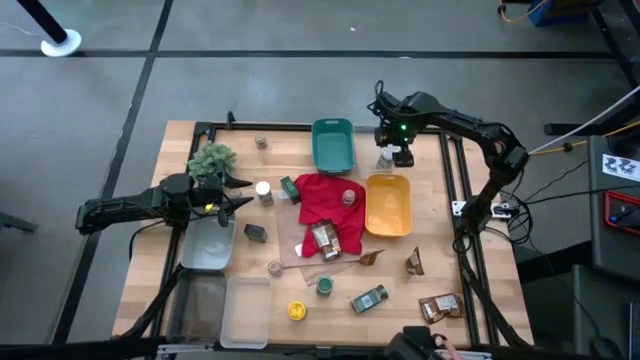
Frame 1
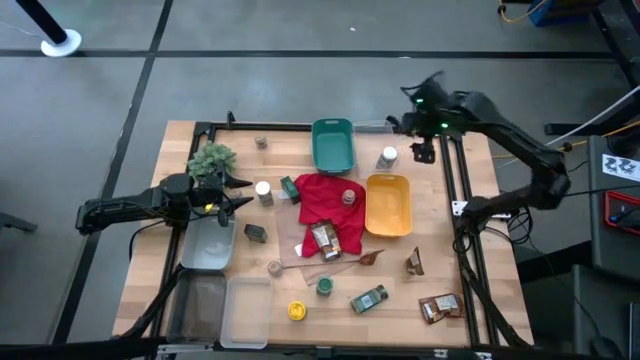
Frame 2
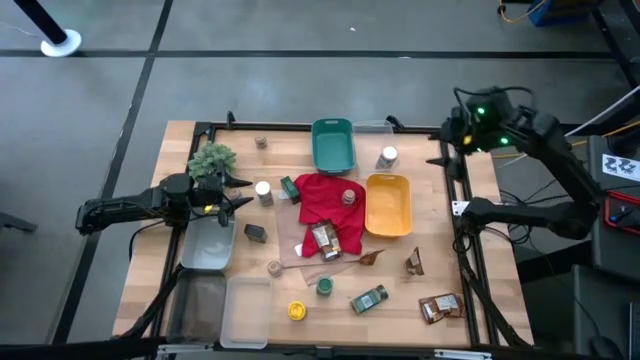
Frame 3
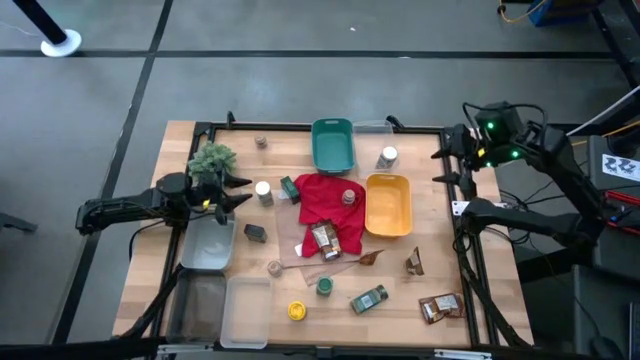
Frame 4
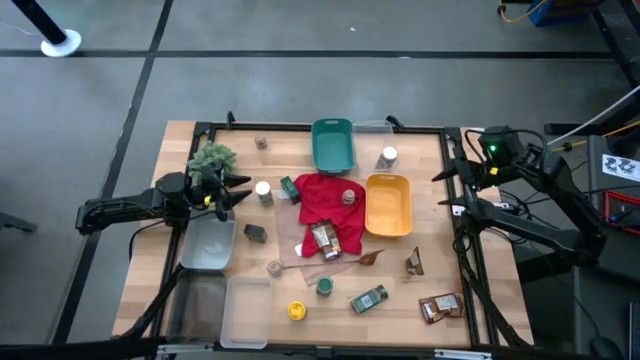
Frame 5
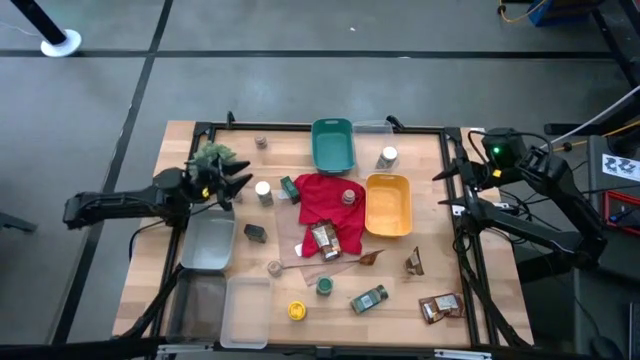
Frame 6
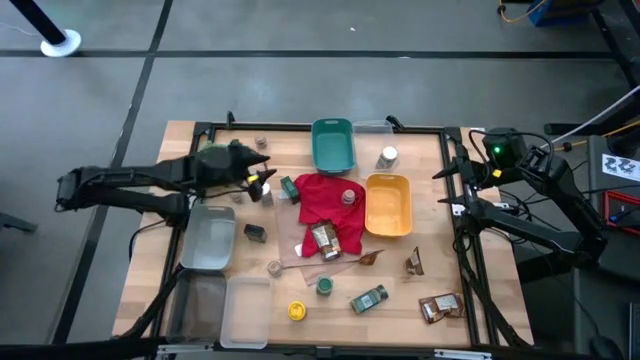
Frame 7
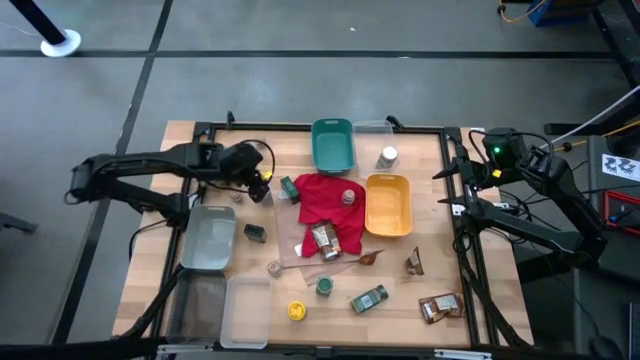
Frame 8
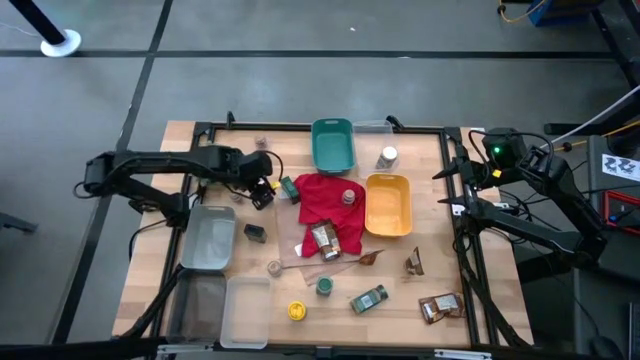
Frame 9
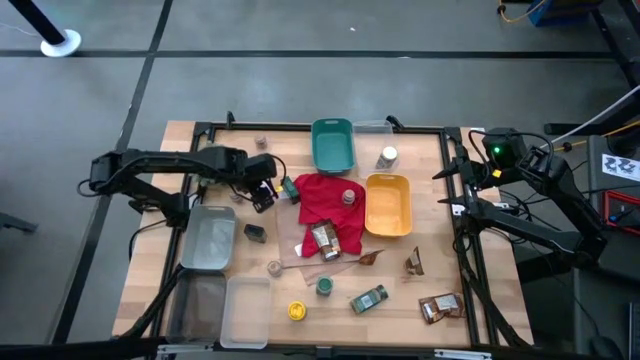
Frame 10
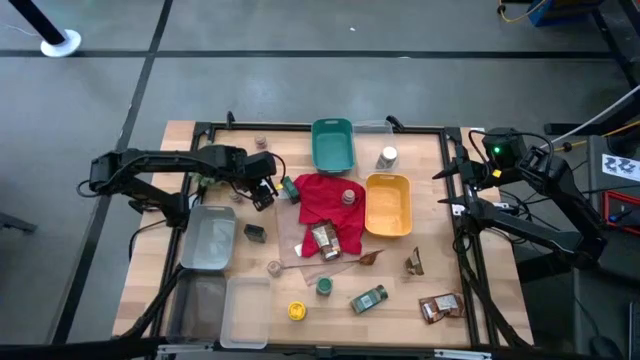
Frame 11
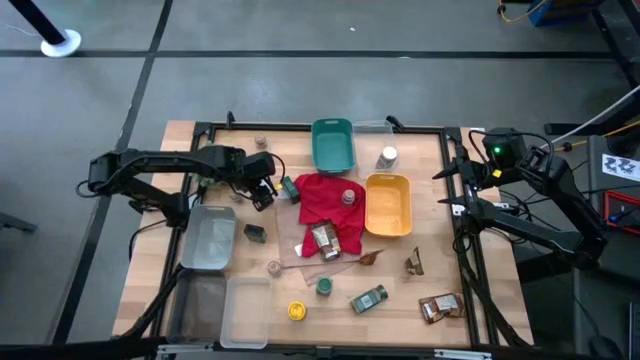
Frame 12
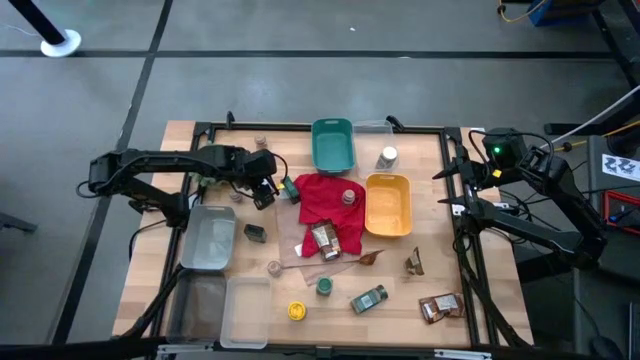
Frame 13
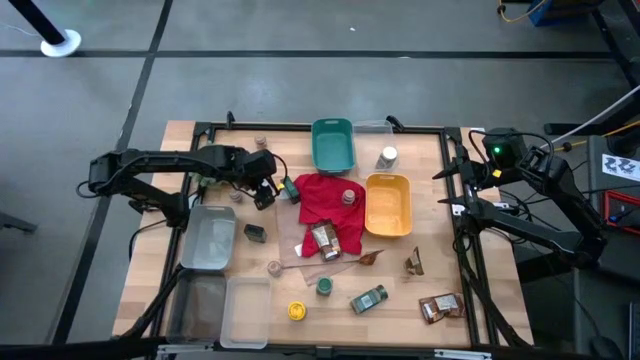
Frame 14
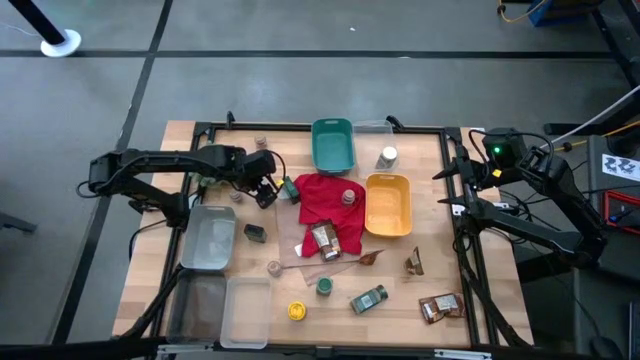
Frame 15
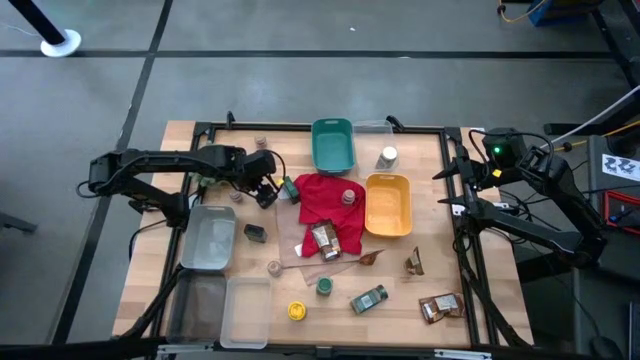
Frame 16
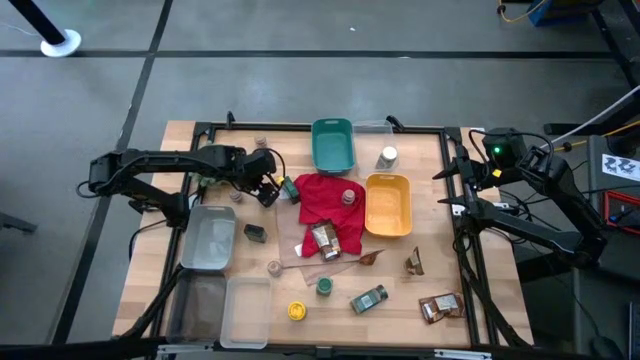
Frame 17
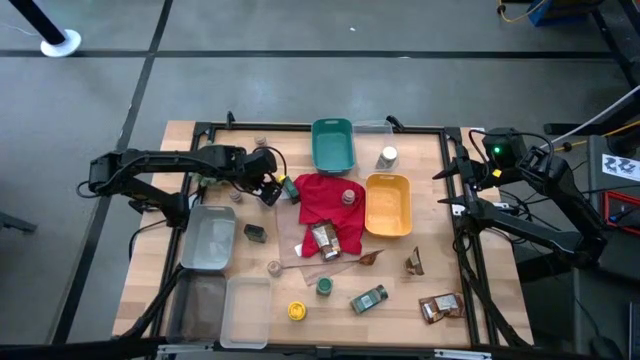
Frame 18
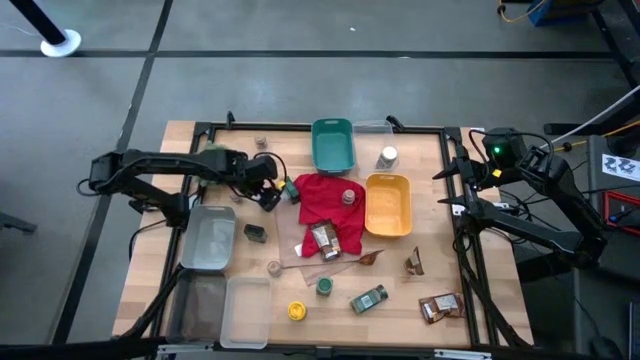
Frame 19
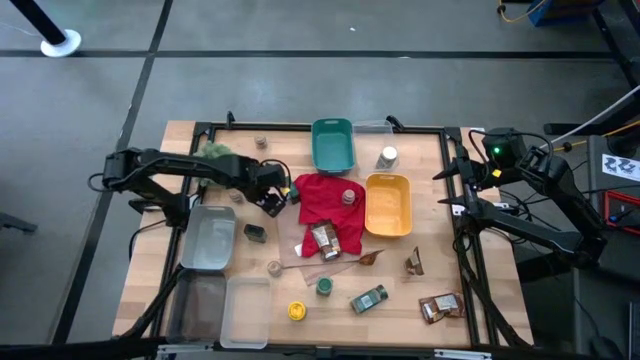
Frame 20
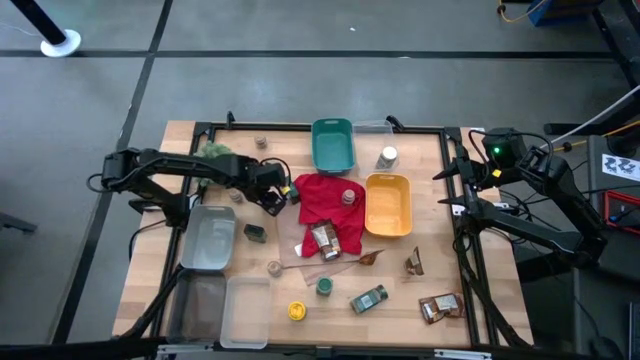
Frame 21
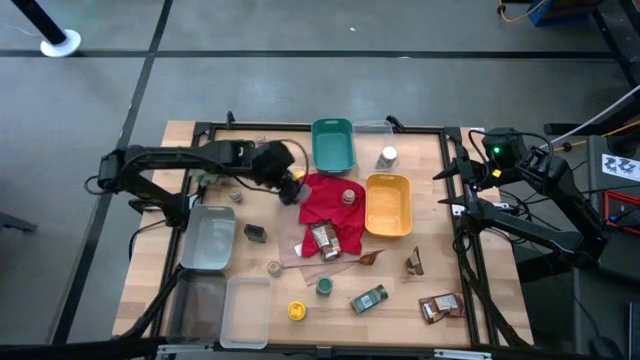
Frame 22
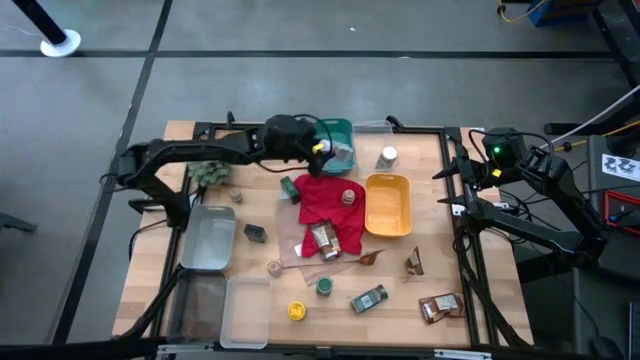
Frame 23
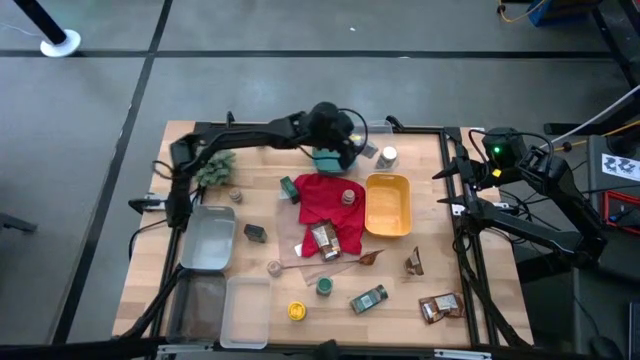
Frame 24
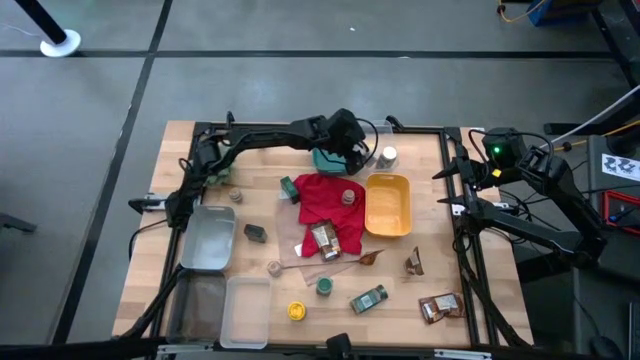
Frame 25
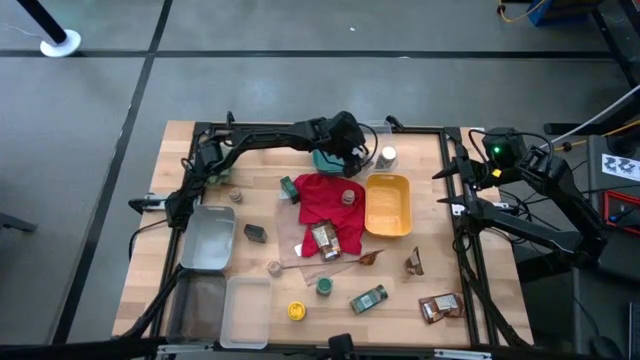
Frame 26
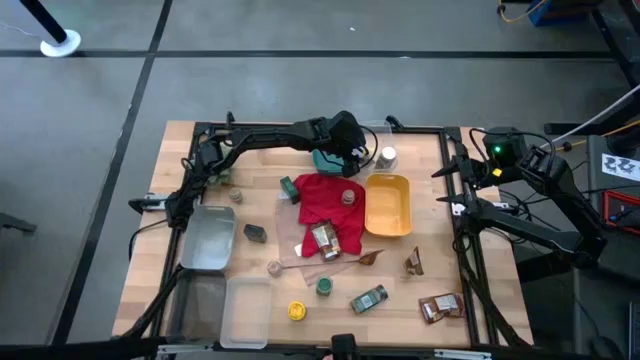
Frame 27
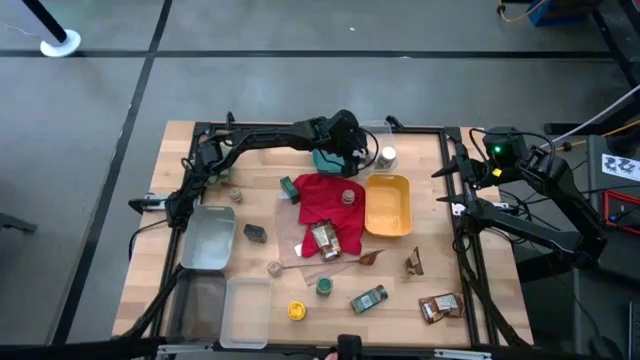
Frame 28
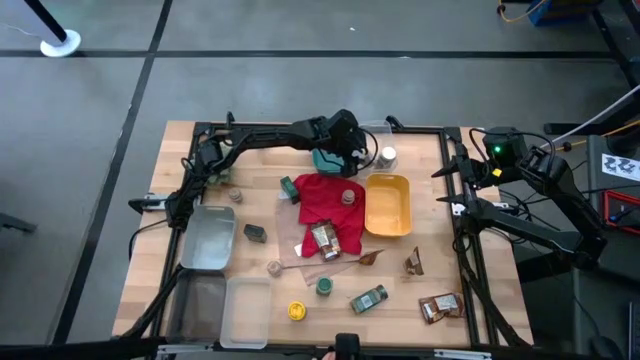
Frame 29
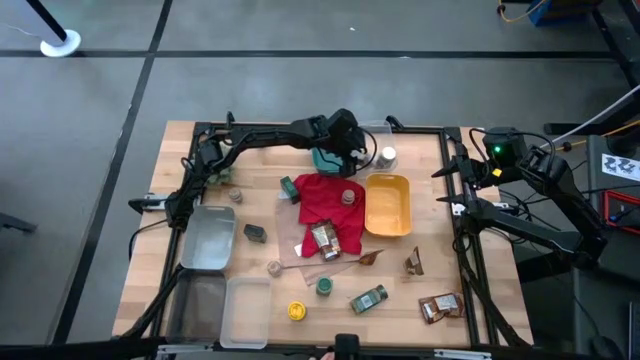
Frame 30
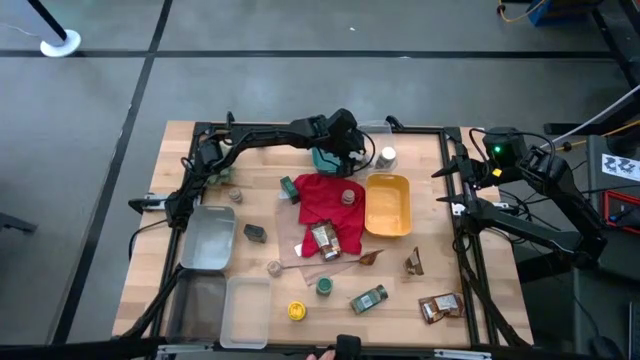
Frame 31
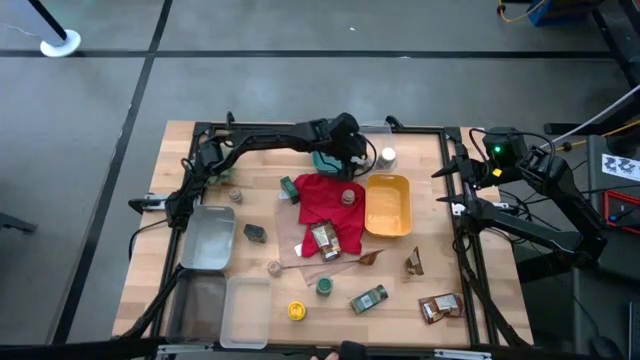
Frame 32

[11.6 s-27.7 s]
Task: Sort spices by type
Put the white seasoning into the top right transparent bin

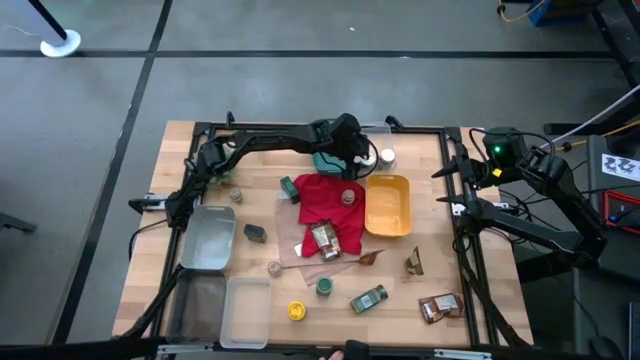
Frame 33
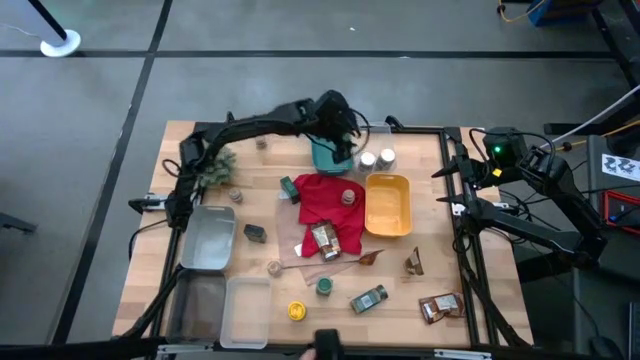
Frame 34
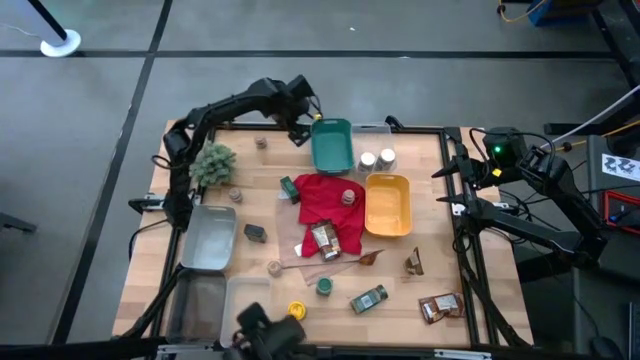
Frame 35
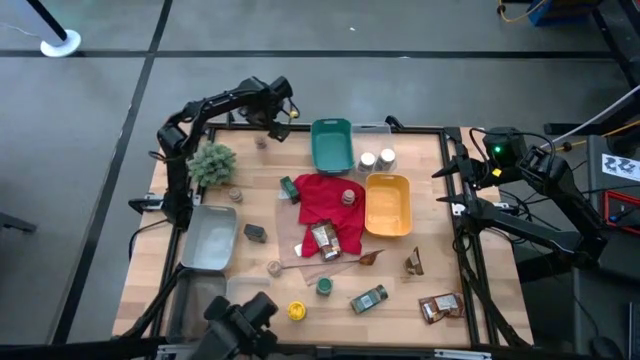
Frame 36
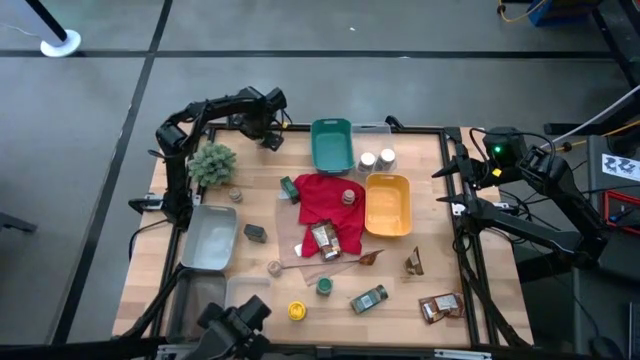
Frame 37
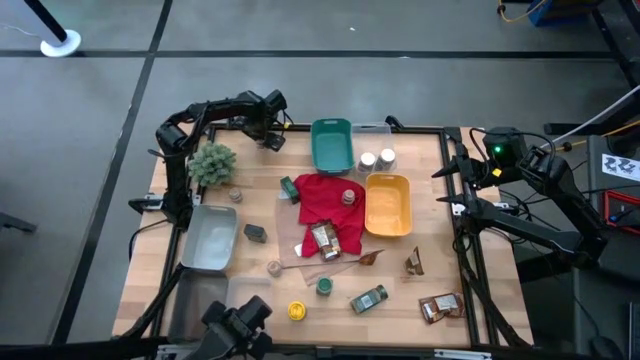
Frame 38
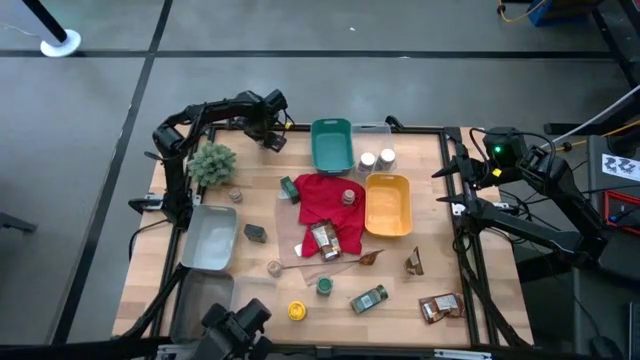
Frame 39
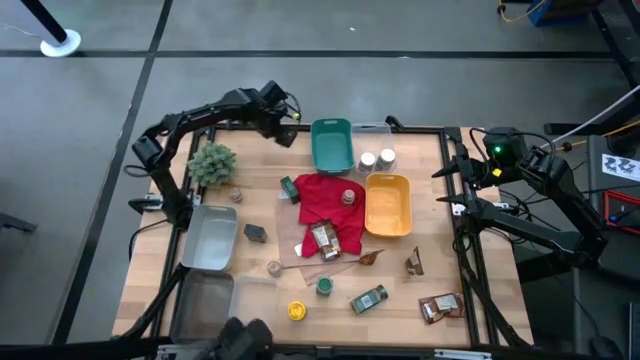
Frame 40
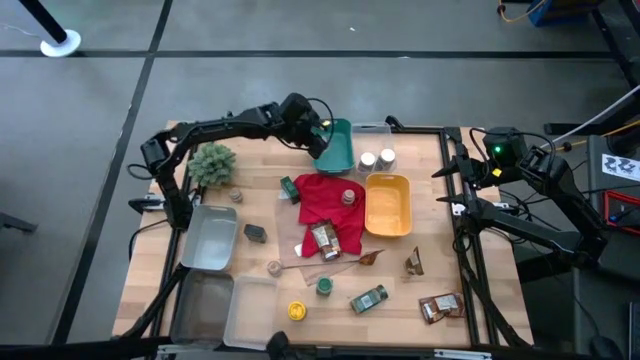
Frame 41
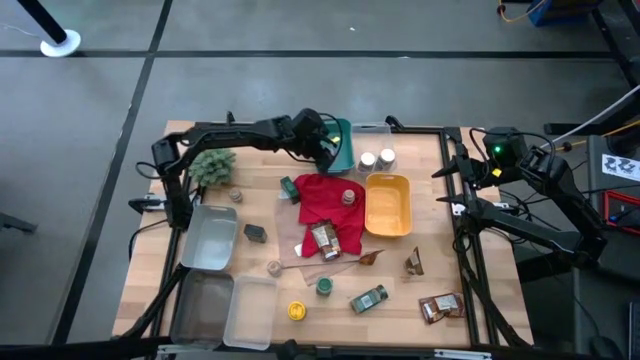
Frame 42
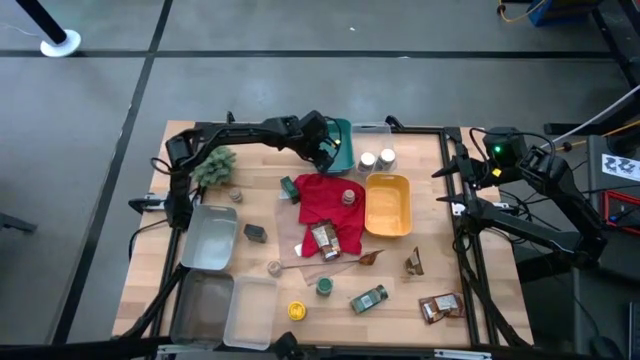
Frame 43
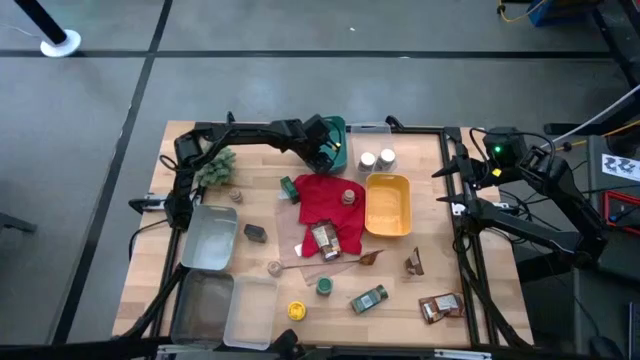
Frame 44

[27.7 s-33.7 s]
Put the top left brown seasoning bottle into the green bin
